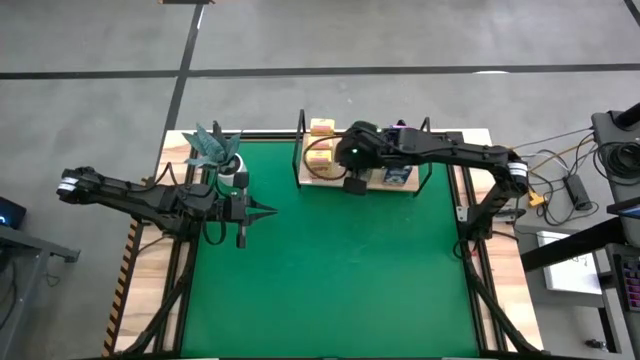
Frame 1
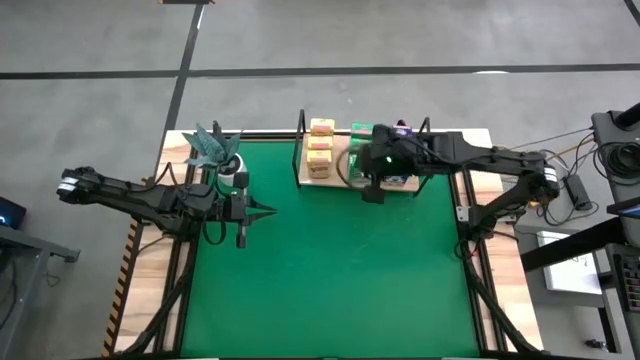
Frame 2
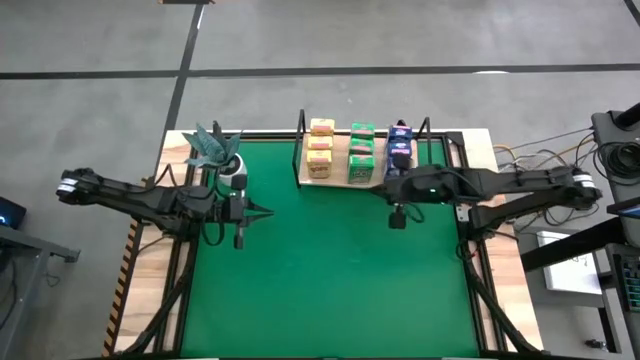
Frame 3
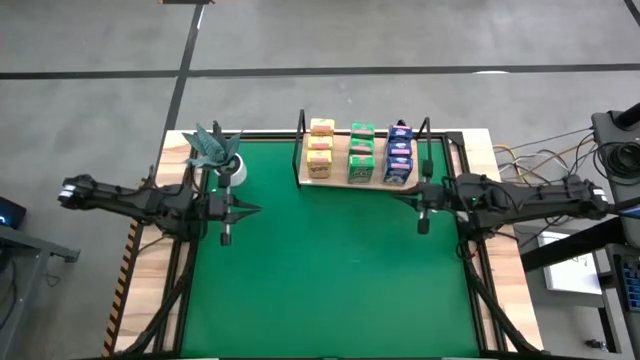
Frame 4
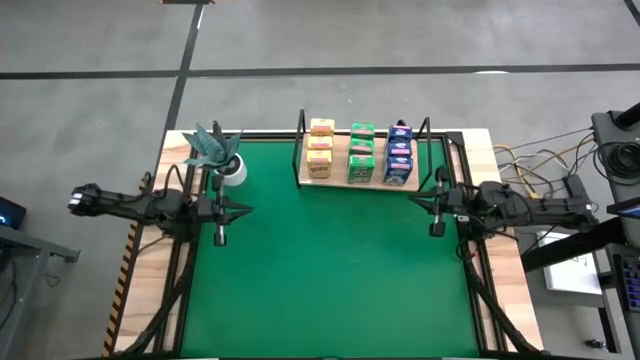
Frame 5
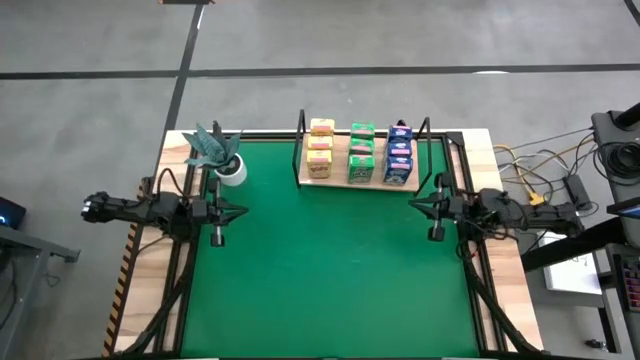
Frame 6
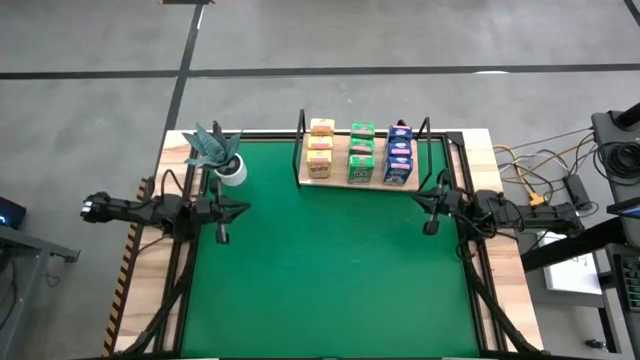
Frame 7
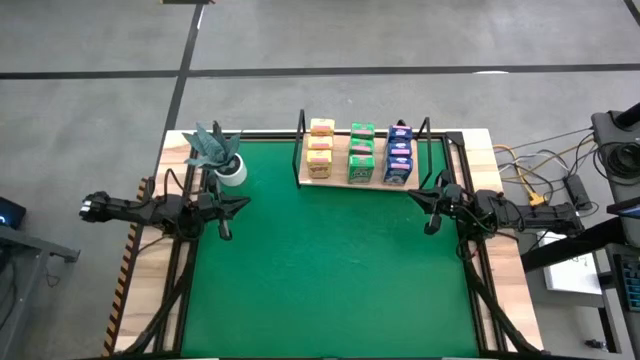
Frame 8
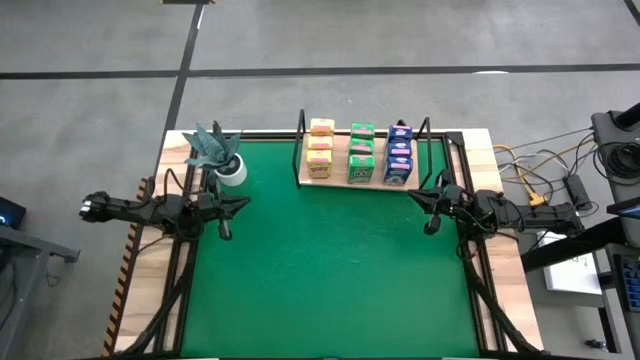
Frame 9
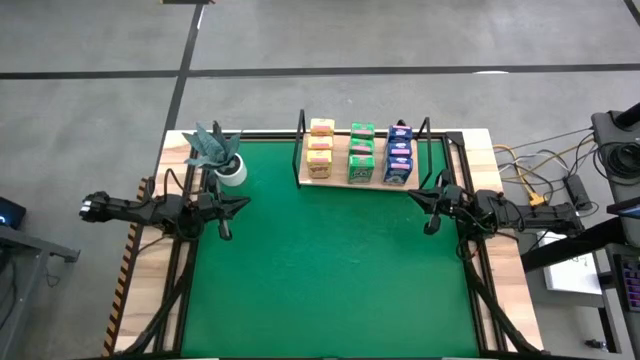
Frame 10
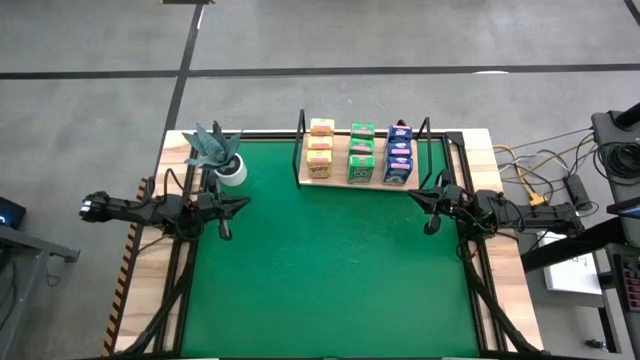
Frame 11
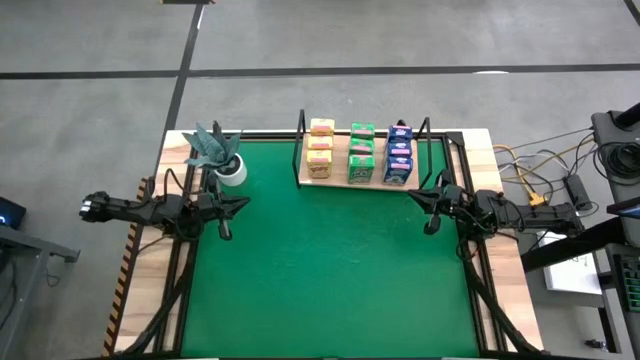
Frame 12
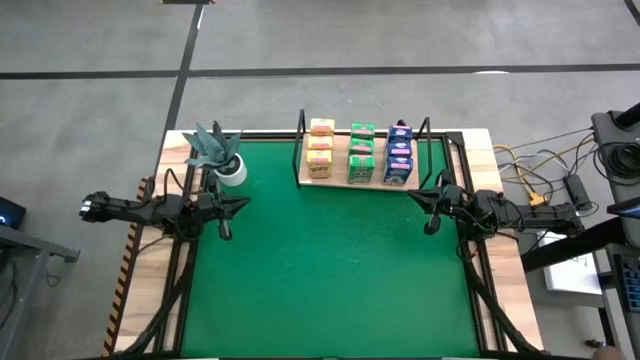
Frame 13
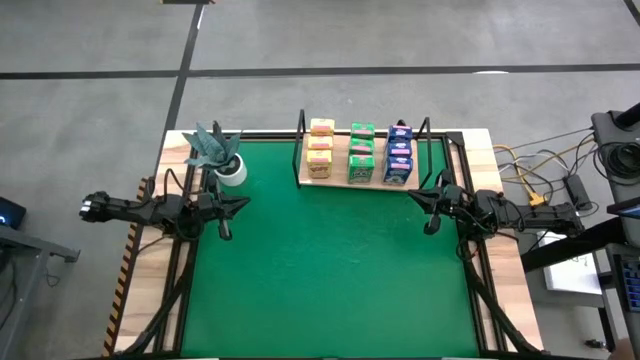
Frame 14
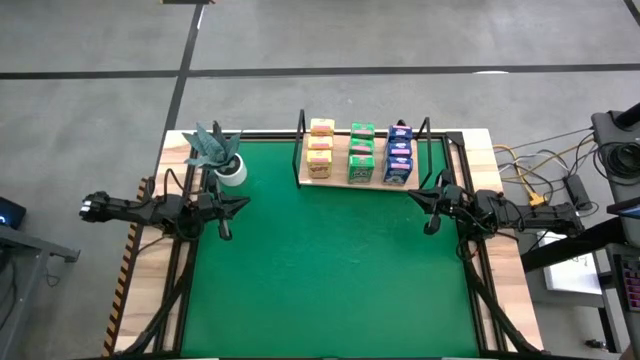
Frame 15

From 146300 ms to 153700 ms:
Task: Stack cereal on shelf
Return to Home Position

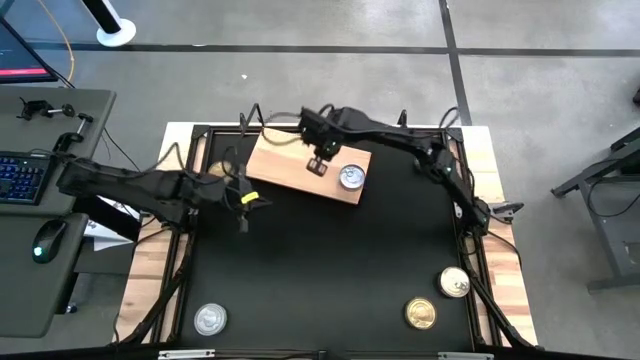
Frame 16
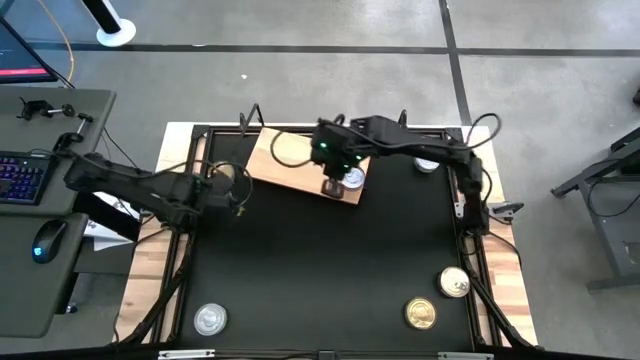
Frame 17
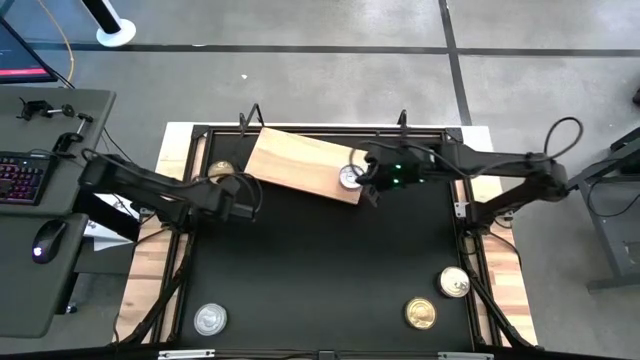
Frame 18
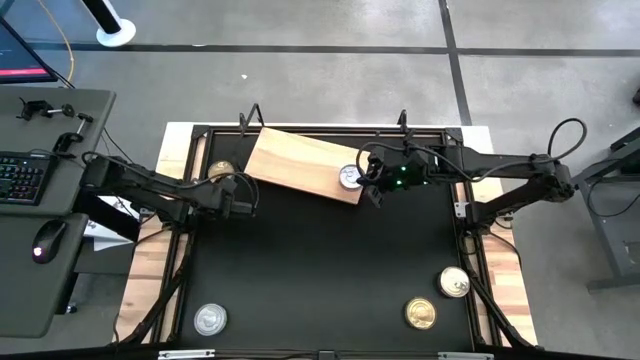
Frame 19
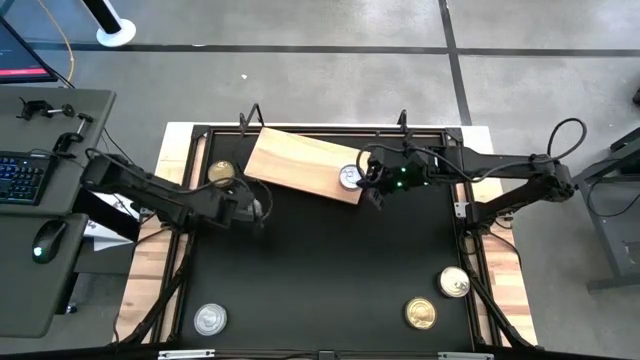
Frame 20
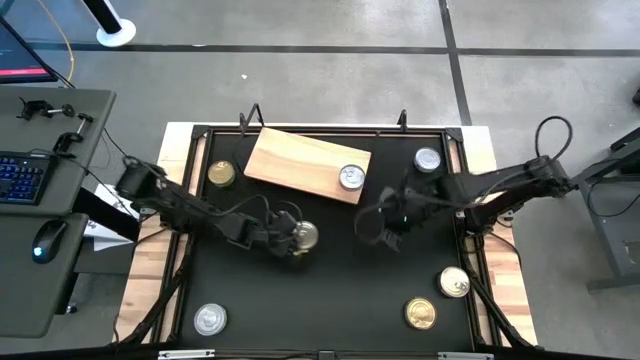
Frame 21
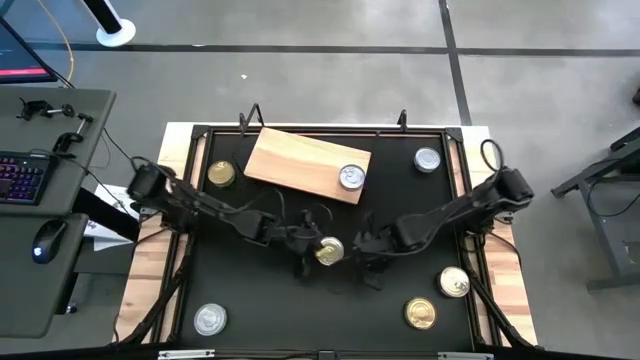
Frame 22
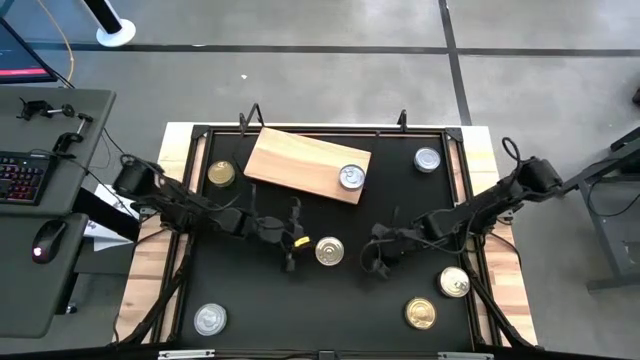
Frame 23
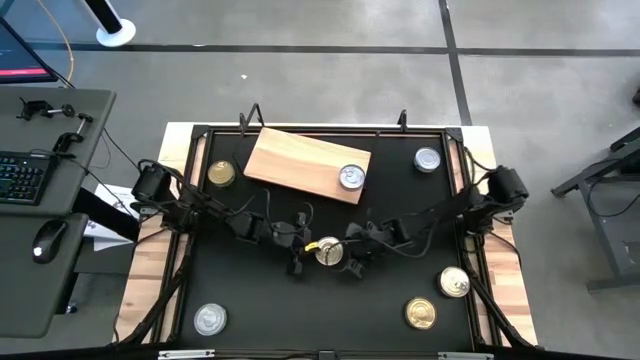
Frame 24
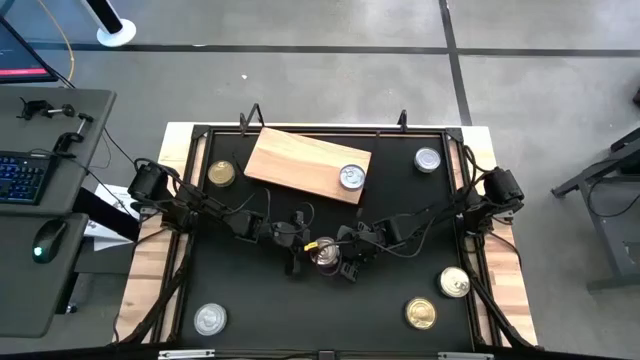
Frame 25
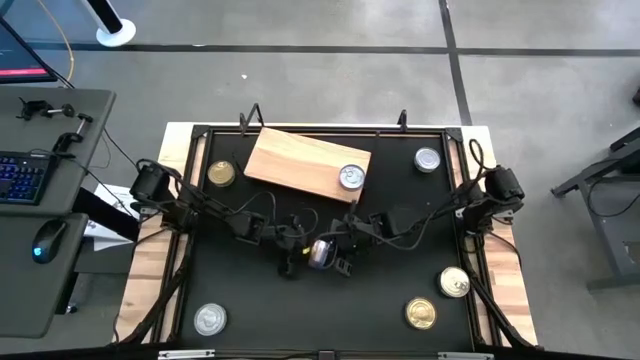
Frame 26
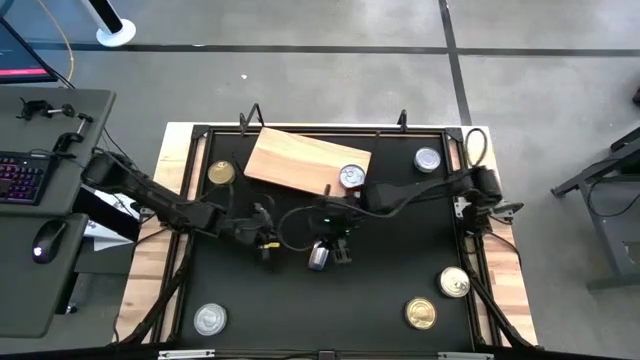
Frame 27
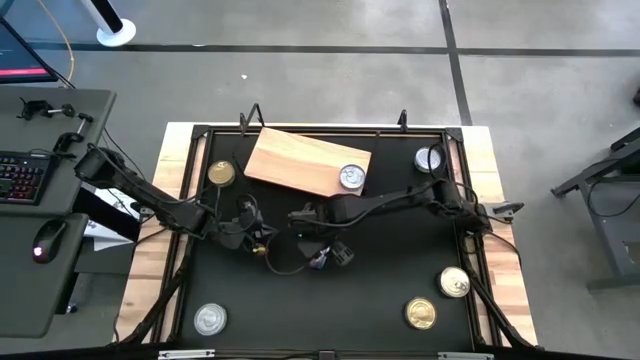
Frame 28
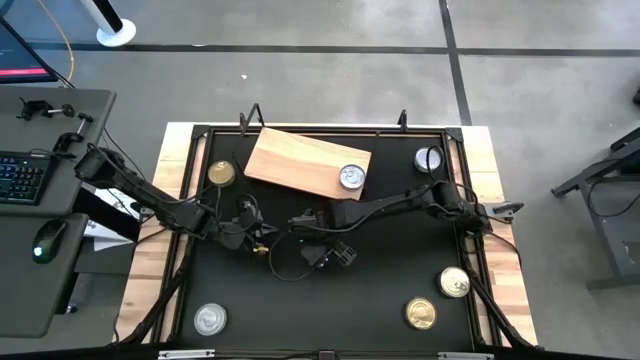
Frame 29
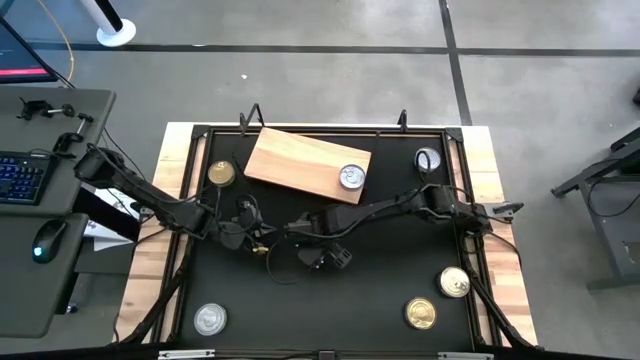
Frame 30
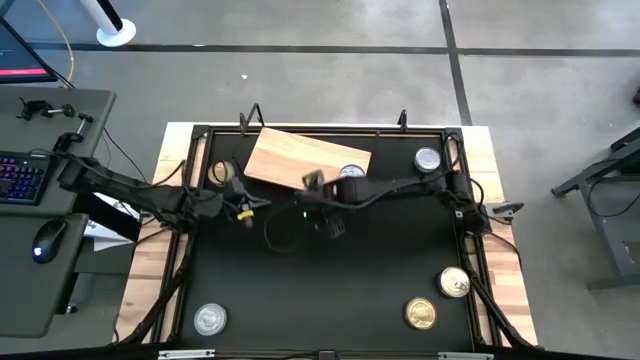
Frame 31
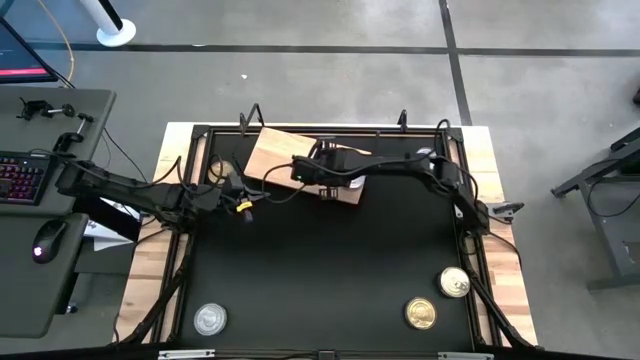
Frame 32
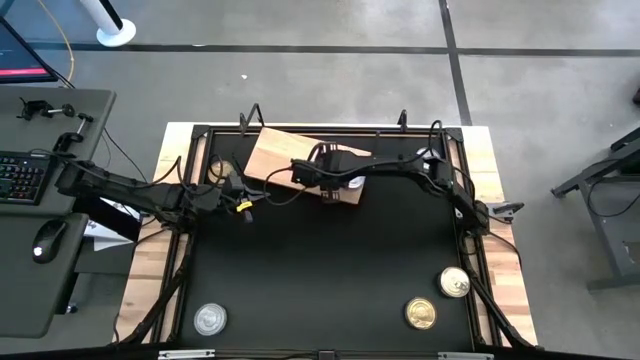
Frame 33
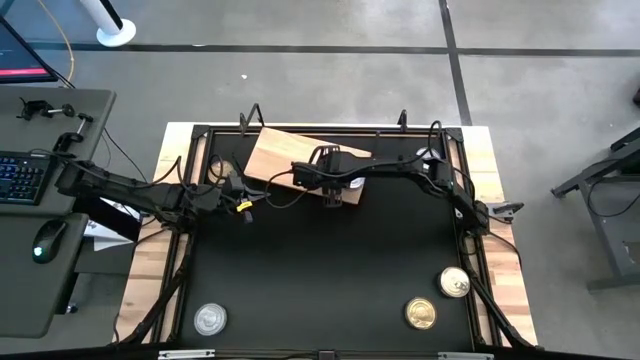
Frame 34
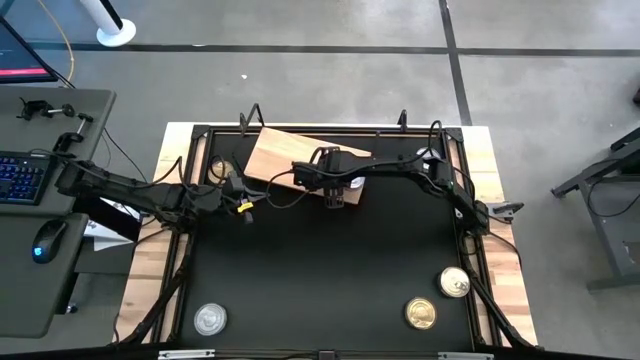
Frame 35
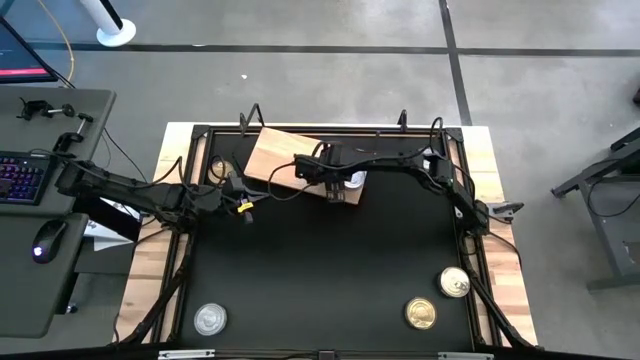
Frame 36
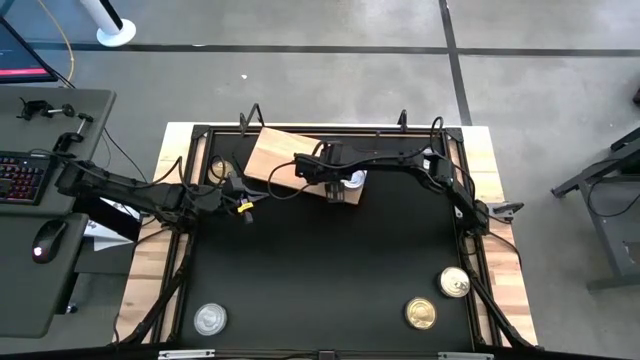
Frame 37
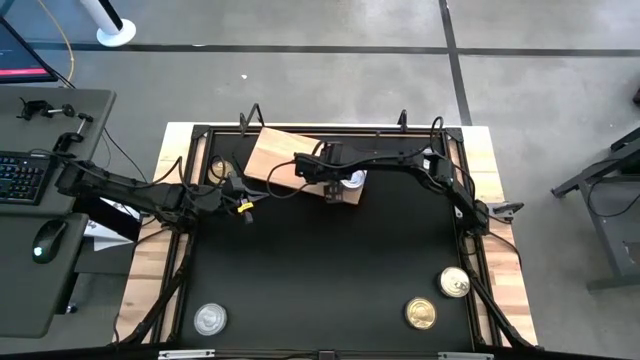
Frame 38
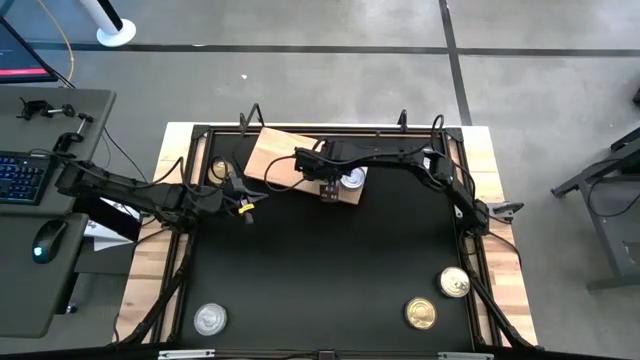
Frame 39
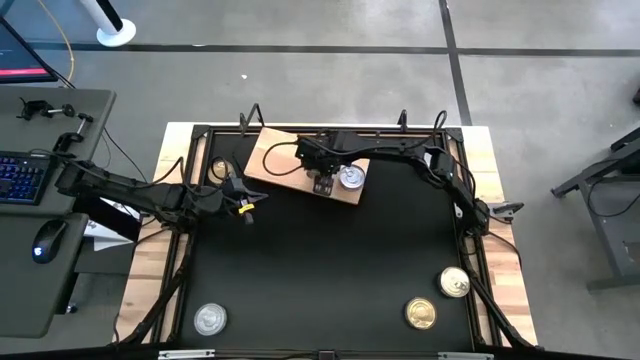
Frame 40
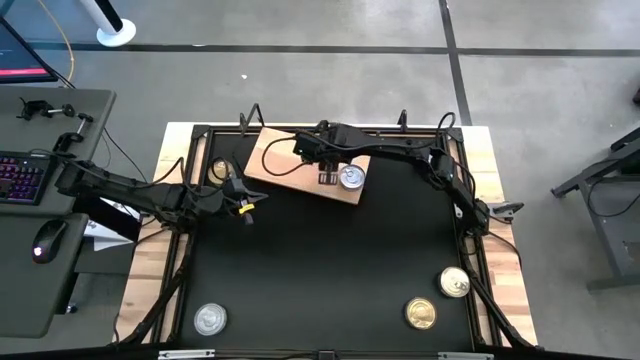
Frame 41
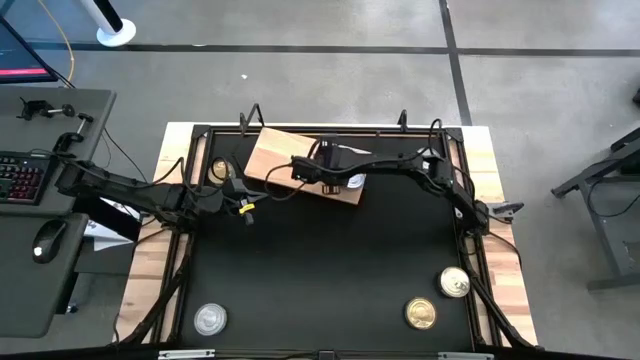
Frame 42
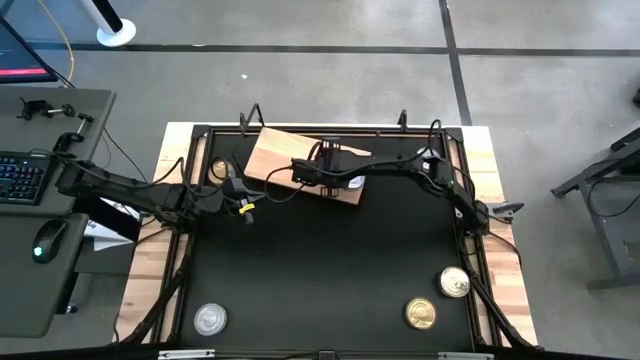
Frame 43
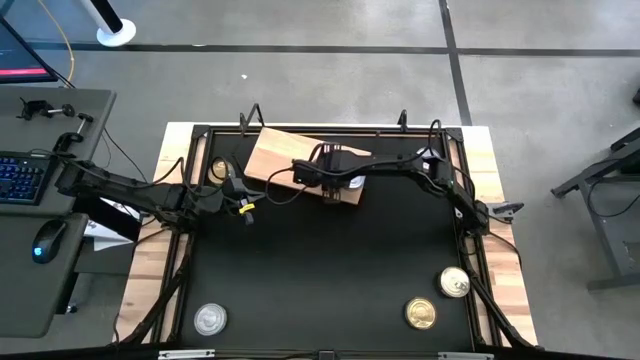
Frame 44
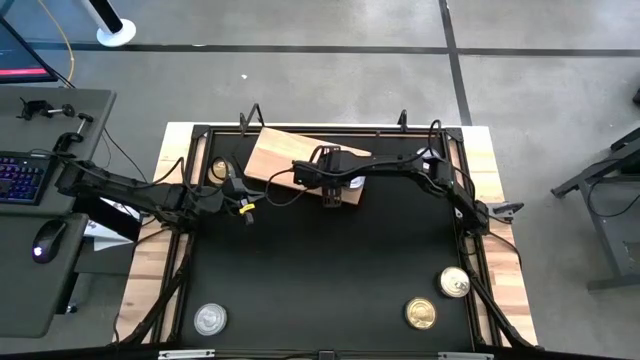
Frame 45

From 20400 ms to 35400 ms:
Task: Stack canned seafood by type on shelf
Put the left blue-pink tuna can on the shelf
